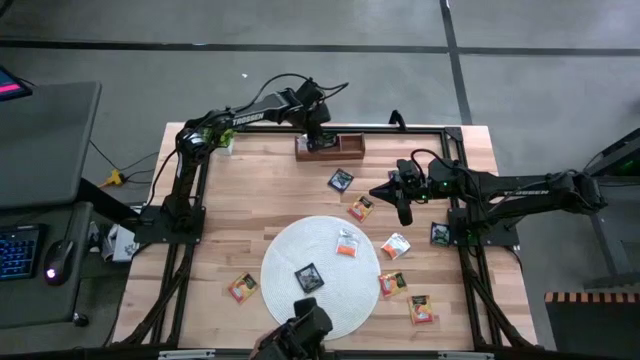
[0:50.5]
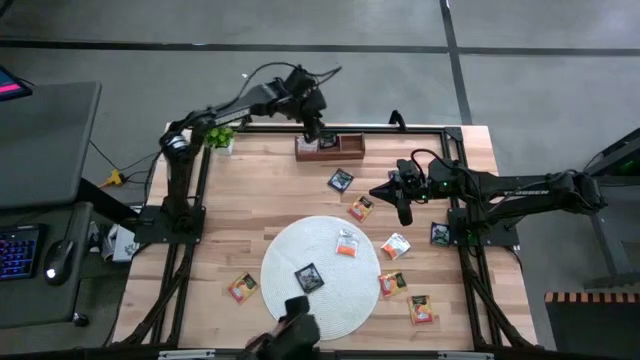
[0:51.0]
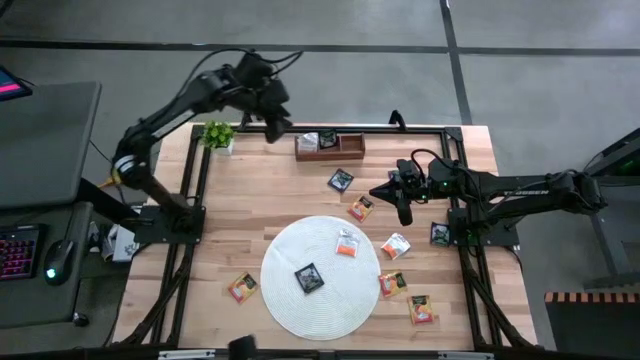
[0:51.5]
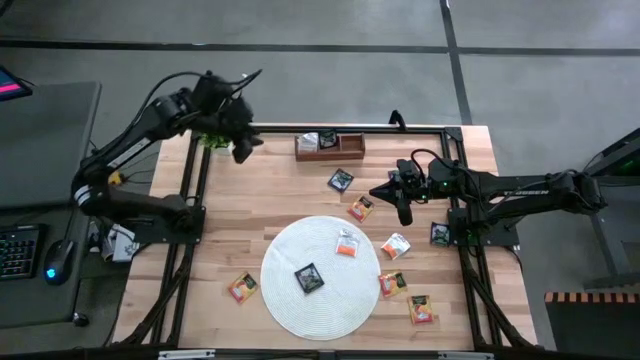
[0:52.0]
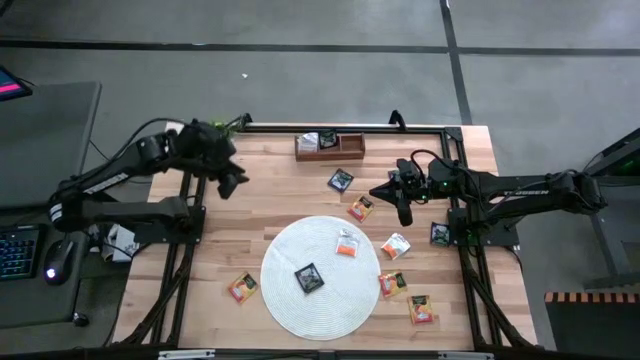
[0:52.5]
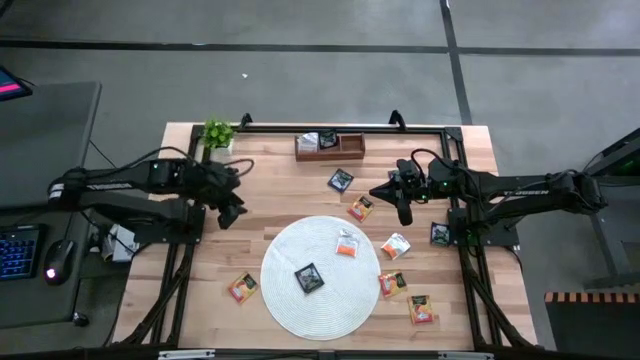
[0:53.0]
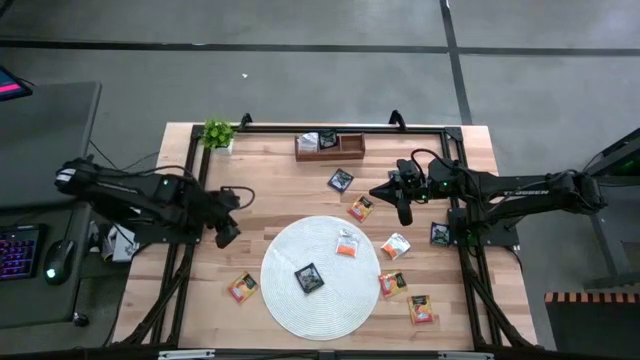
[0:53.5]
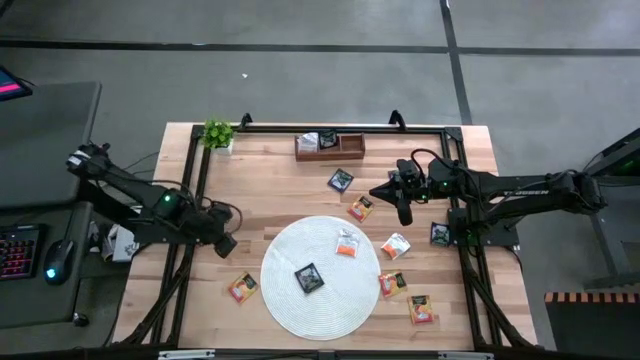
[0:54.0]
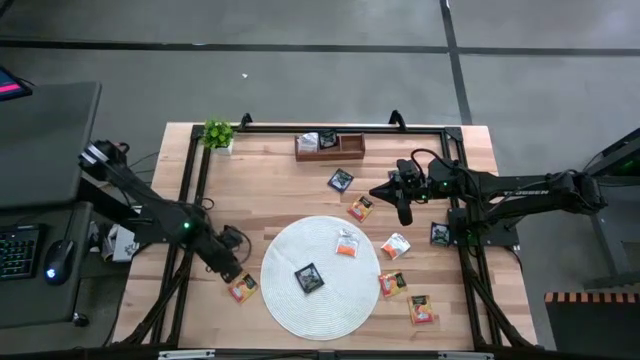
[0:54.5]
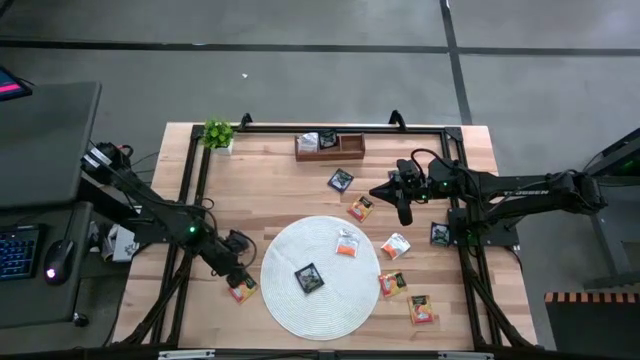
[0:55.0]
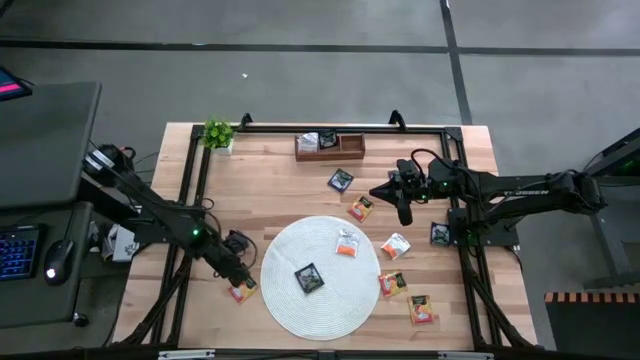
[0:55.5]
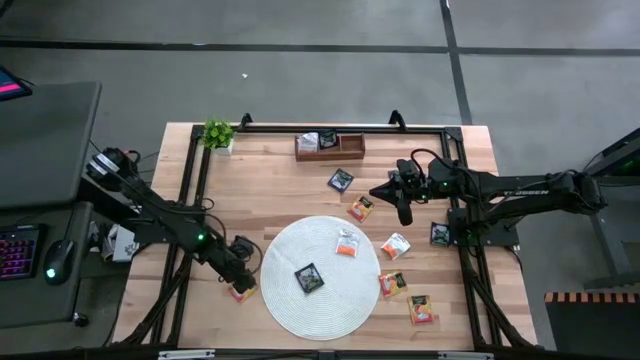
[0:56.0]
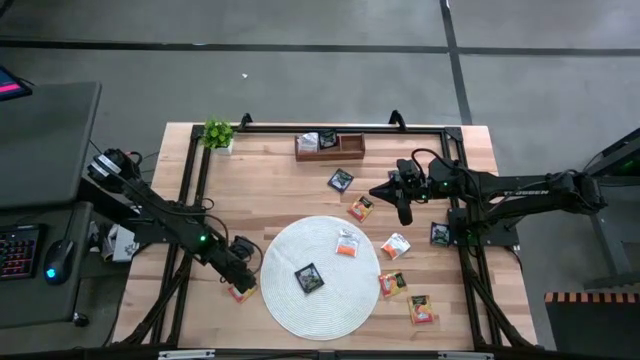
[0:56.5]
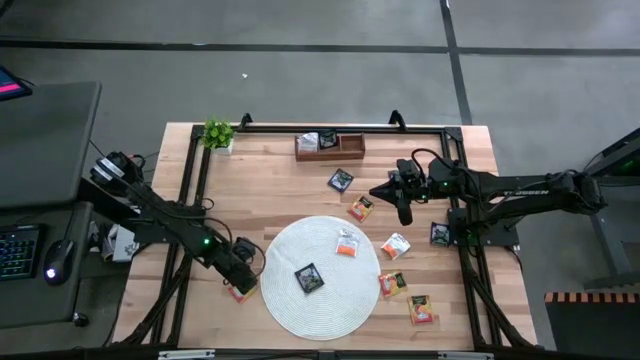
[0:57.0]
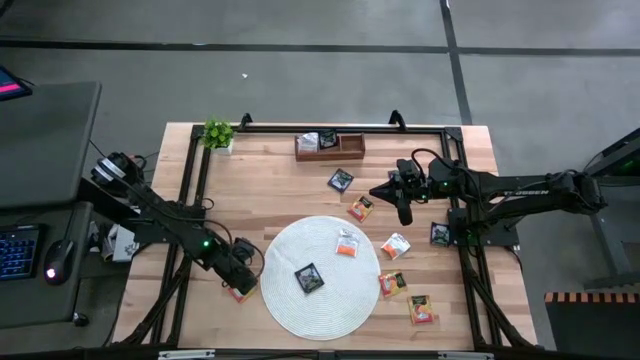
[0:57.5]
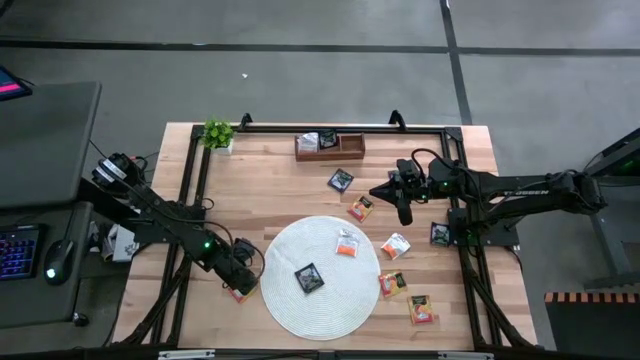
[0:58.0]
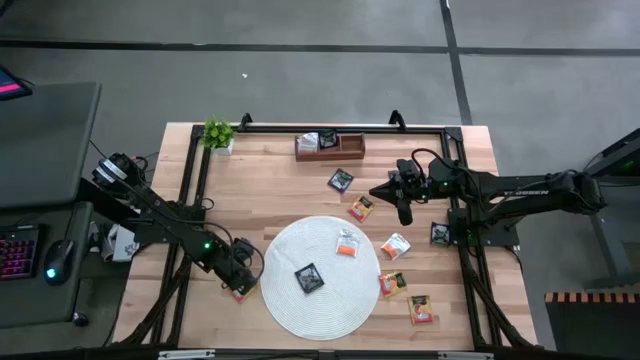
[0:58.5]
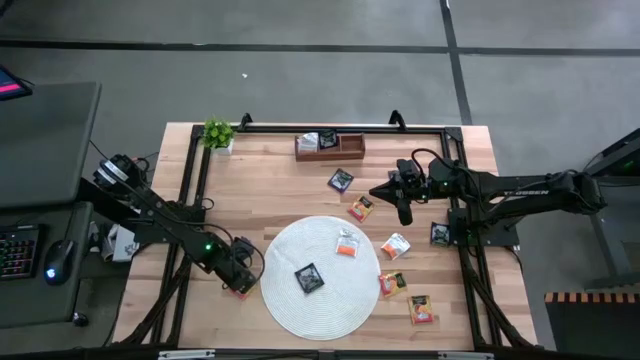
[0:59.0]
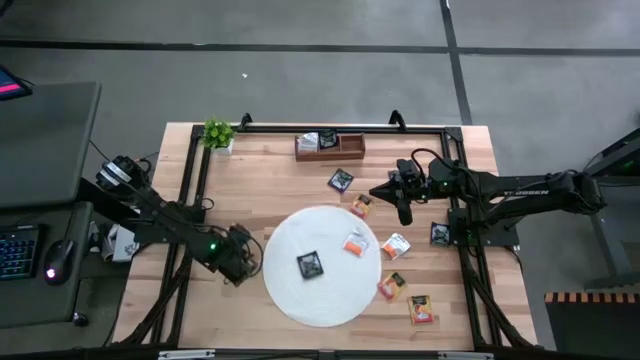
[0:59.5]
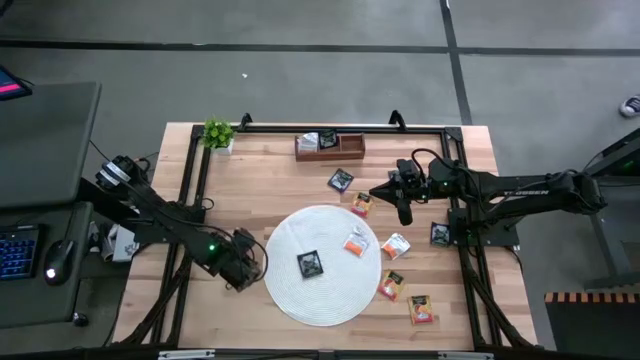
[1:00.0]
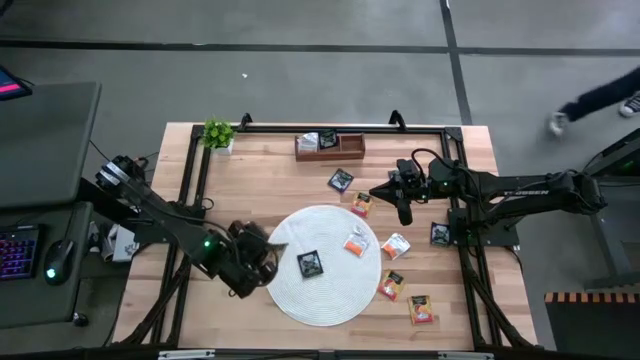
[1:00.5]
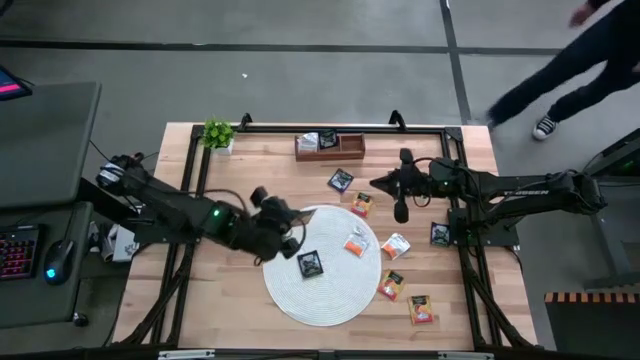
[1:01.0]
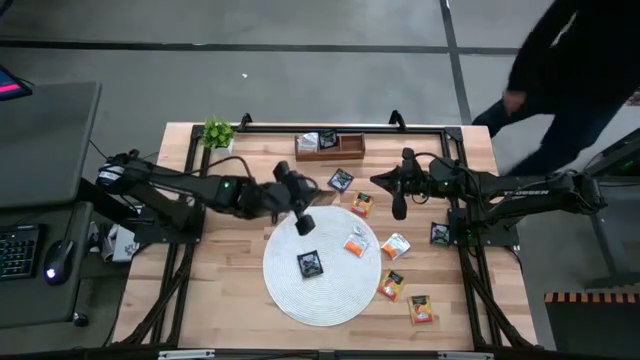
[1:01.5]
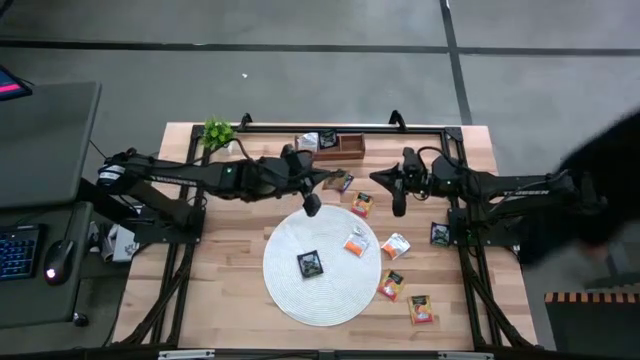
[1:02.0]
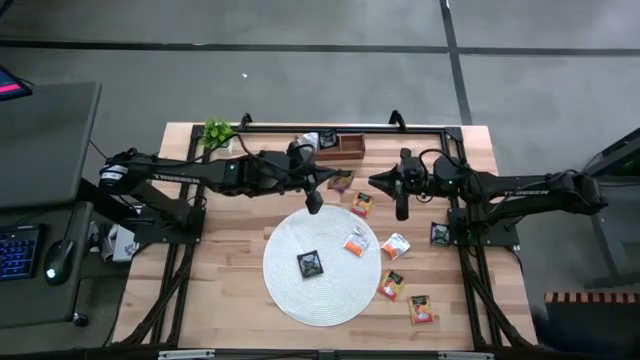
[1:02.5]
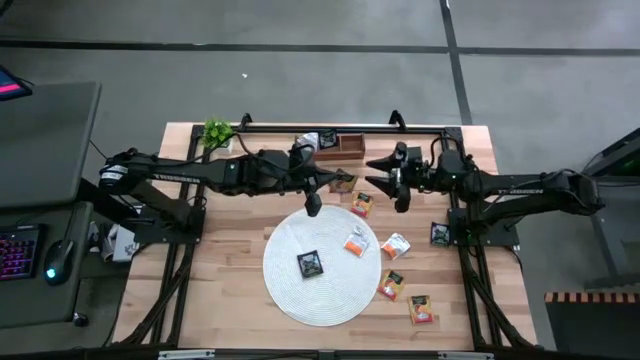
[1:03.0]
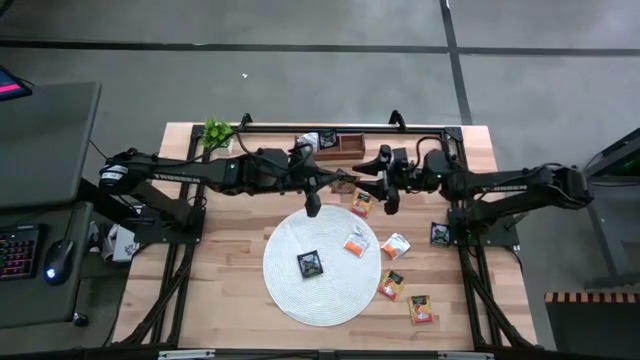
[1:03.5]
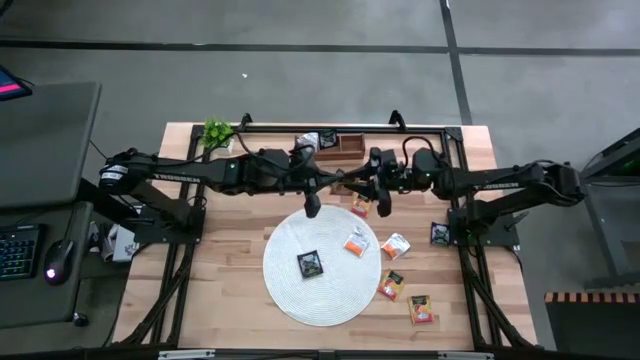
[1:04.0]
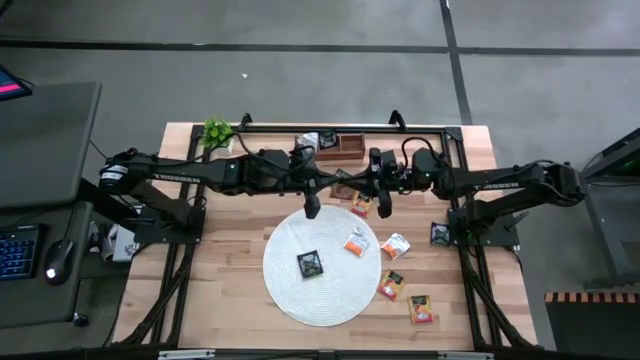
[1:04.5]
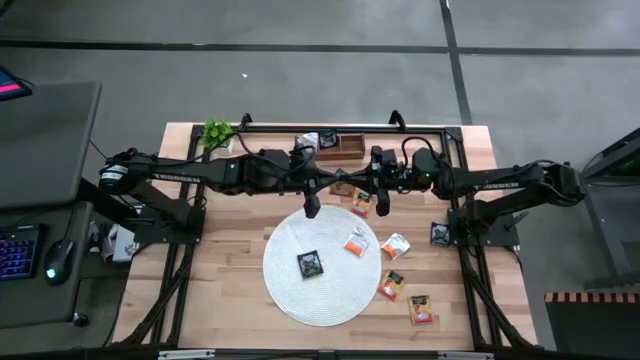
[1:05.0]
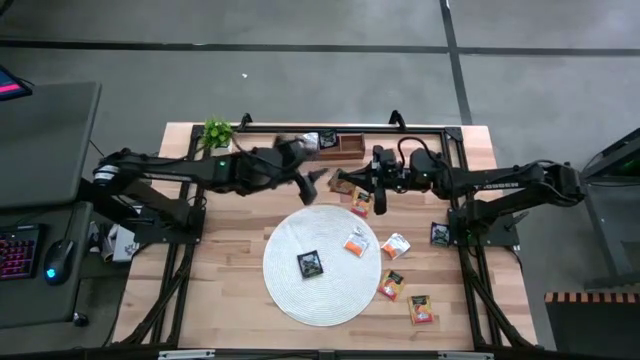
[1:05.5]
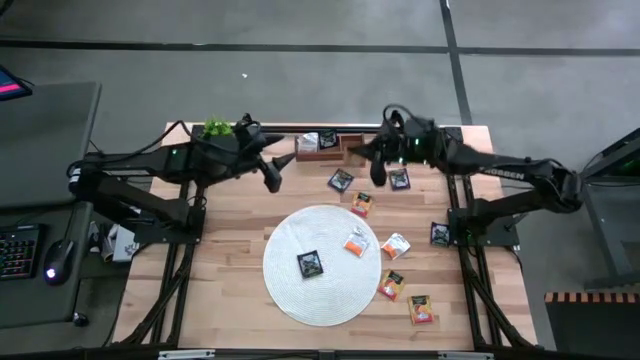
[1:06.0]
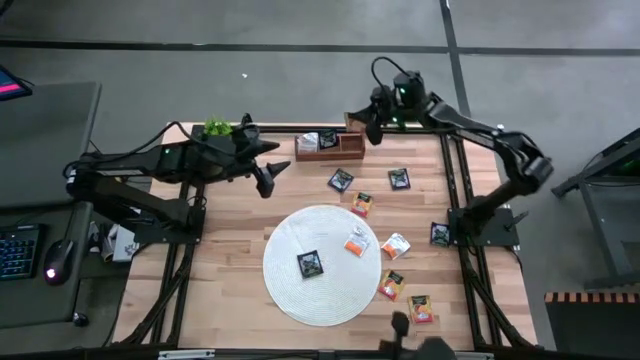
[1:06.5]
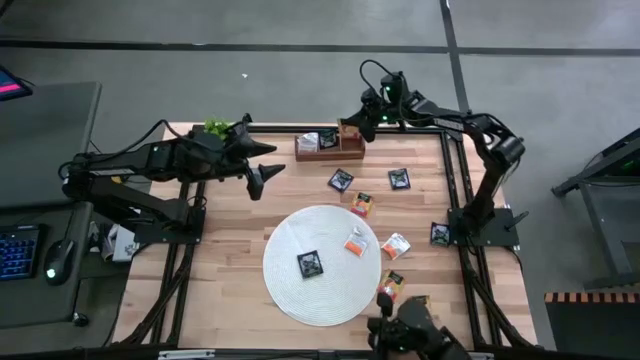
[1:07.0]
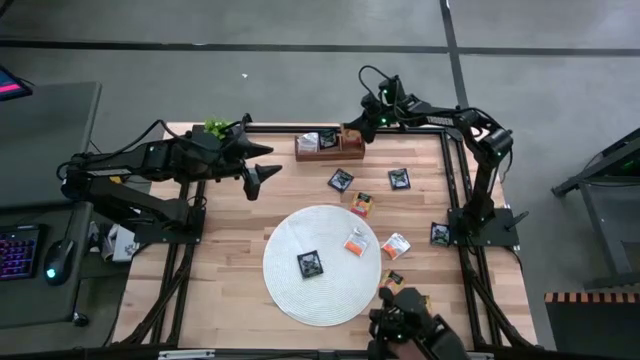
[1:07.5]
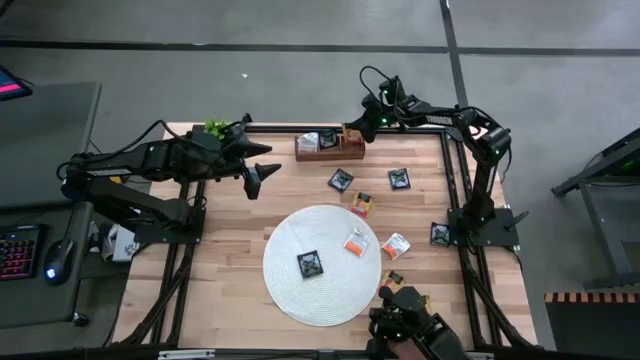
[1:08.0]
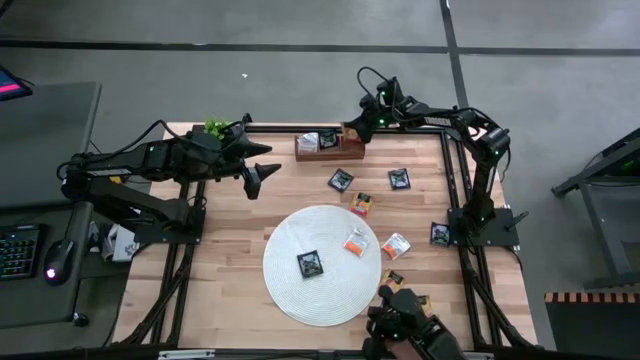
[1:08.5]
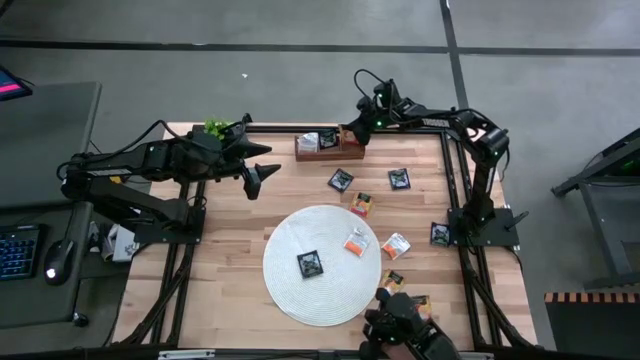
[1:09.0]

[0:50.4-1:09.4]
Task: Pick & Place Tea
Put the yellow tea bag into the right section of the wooden organizer
